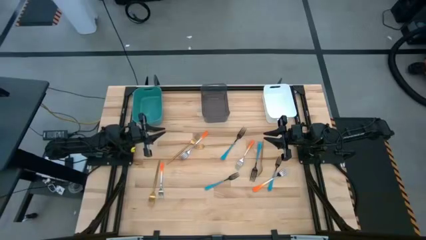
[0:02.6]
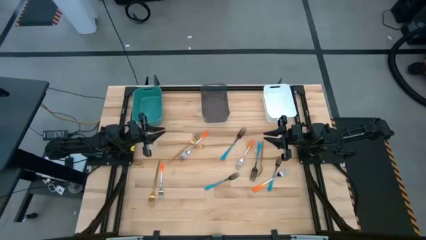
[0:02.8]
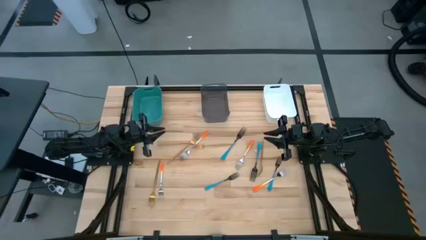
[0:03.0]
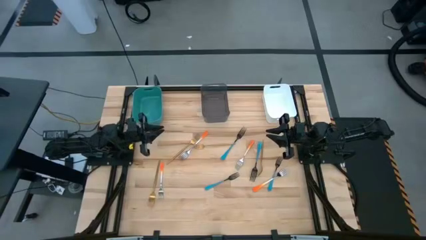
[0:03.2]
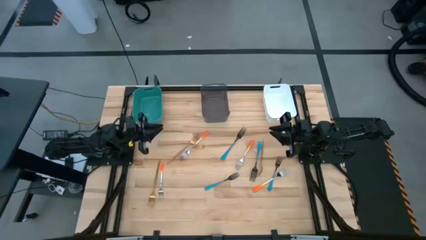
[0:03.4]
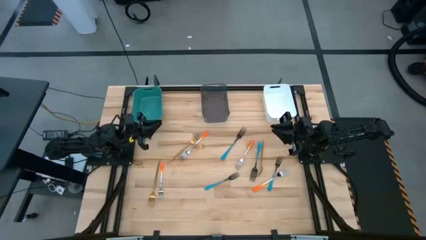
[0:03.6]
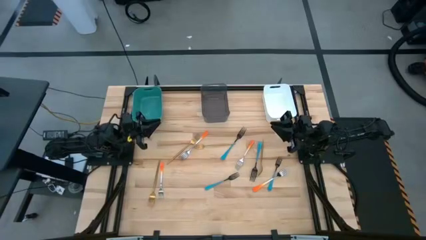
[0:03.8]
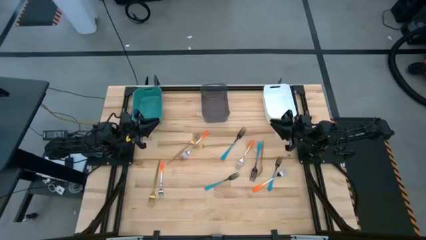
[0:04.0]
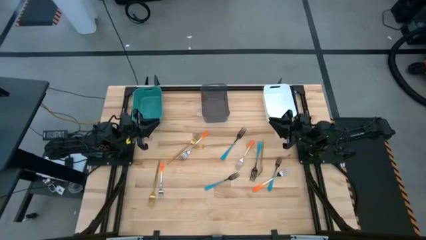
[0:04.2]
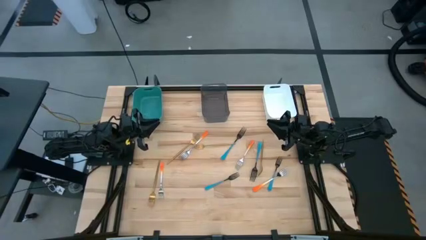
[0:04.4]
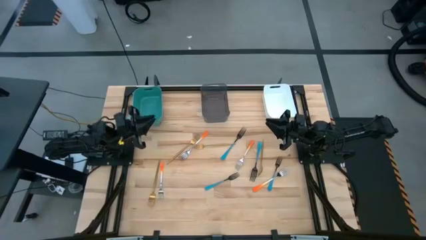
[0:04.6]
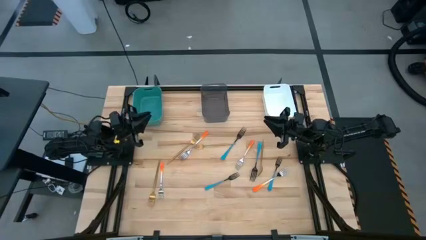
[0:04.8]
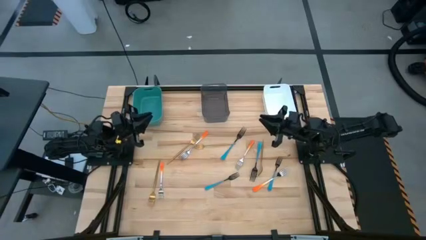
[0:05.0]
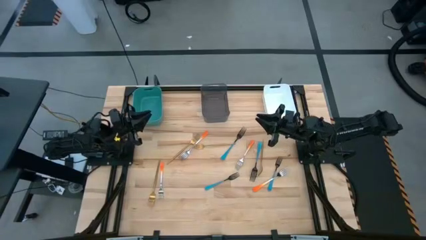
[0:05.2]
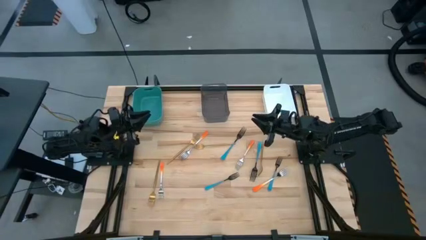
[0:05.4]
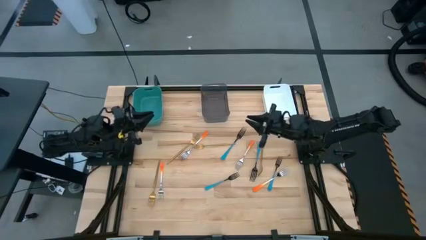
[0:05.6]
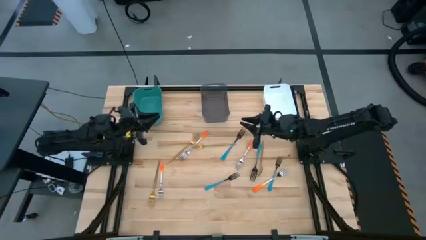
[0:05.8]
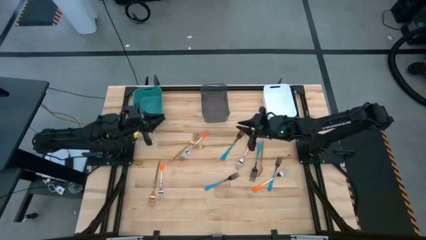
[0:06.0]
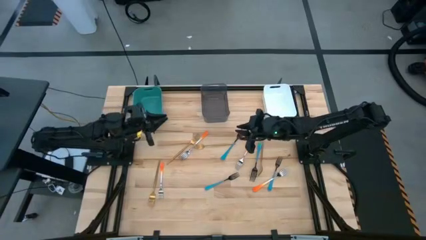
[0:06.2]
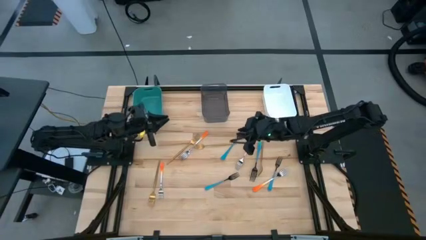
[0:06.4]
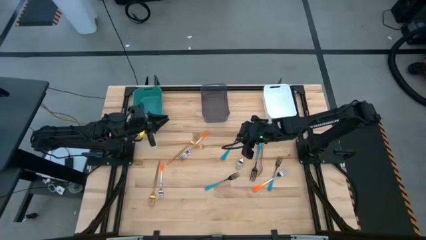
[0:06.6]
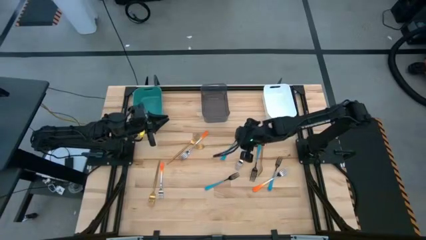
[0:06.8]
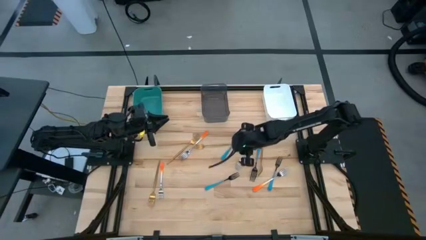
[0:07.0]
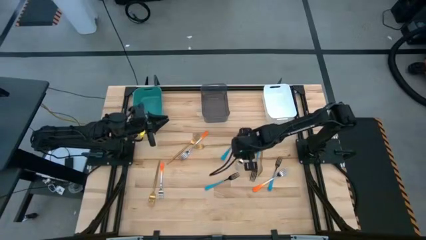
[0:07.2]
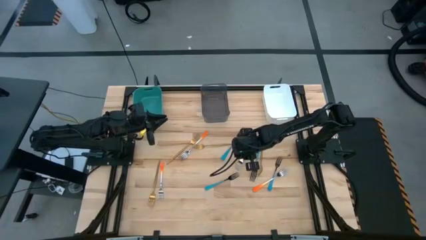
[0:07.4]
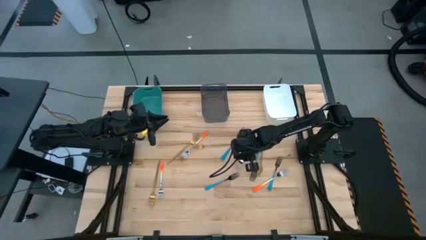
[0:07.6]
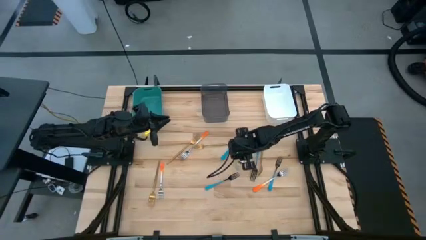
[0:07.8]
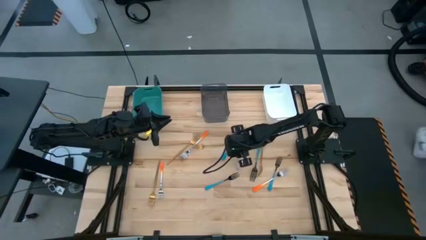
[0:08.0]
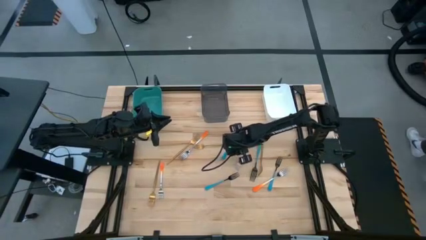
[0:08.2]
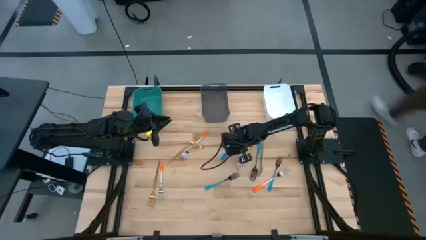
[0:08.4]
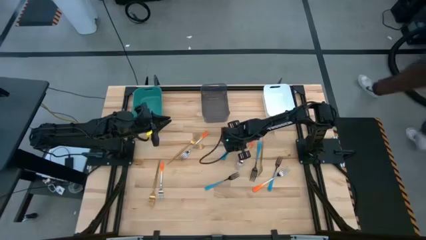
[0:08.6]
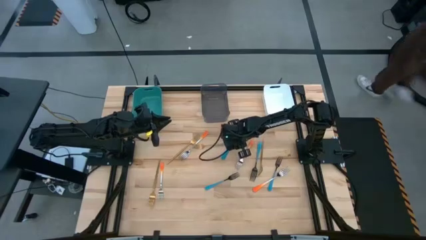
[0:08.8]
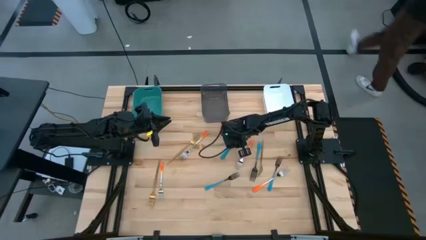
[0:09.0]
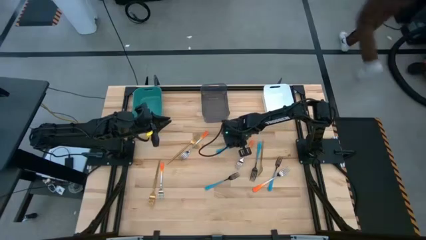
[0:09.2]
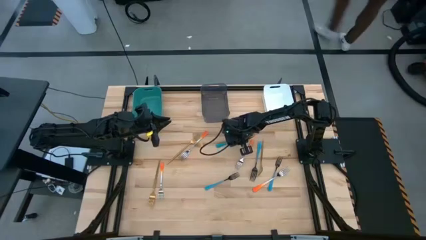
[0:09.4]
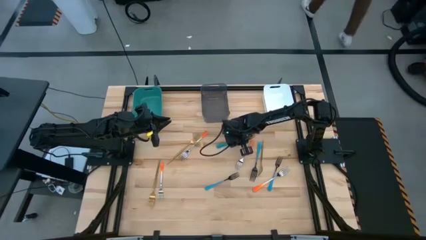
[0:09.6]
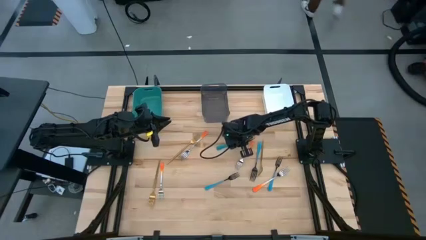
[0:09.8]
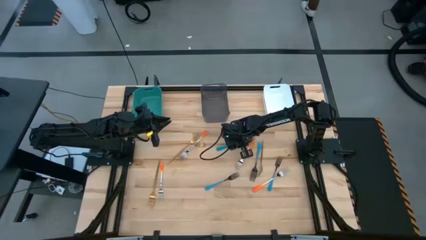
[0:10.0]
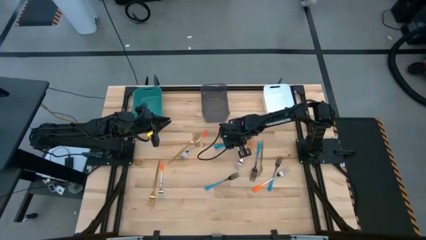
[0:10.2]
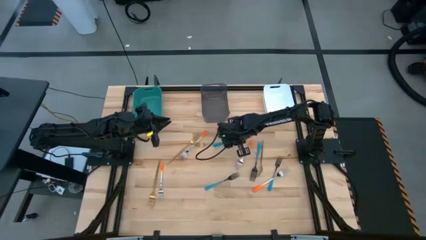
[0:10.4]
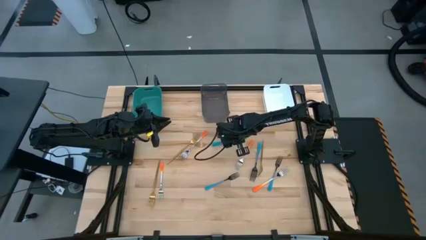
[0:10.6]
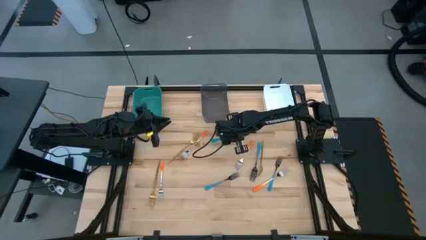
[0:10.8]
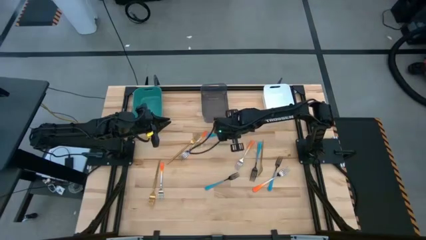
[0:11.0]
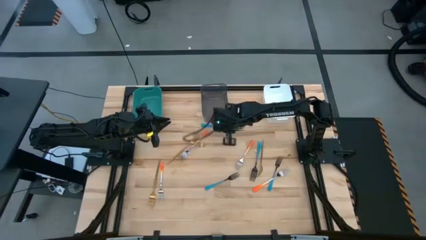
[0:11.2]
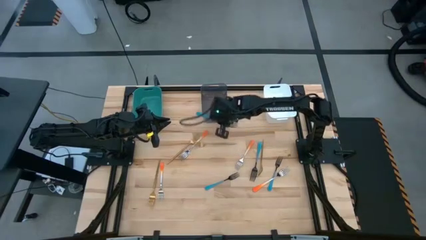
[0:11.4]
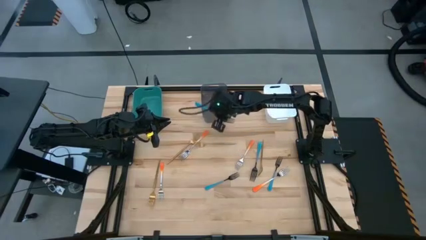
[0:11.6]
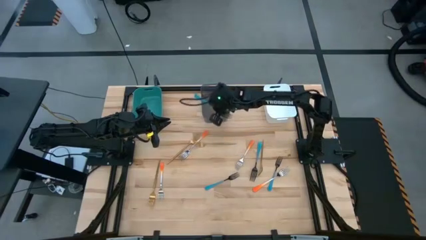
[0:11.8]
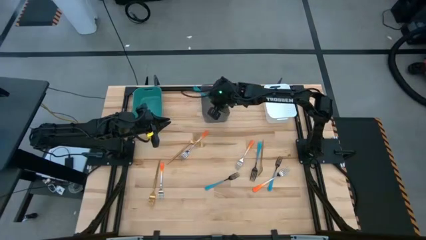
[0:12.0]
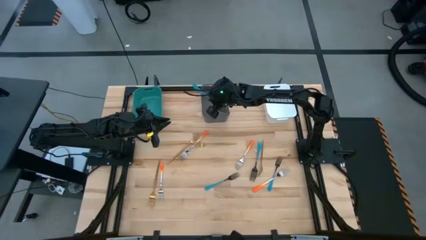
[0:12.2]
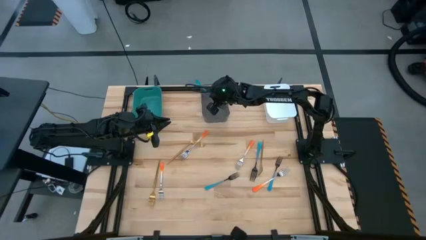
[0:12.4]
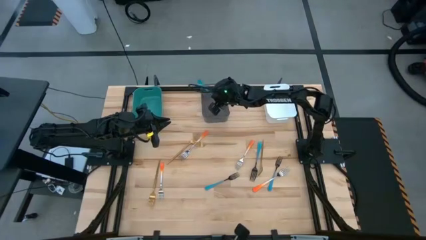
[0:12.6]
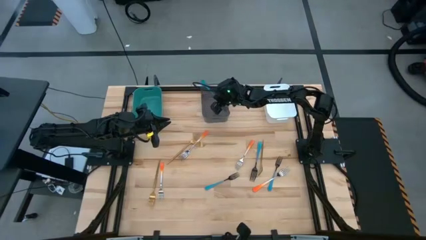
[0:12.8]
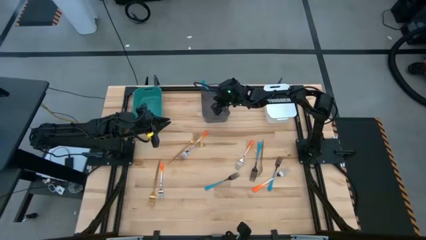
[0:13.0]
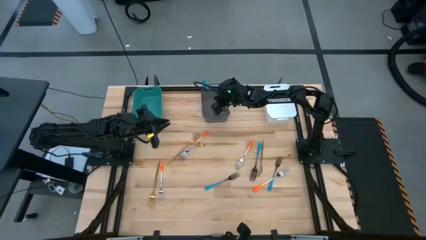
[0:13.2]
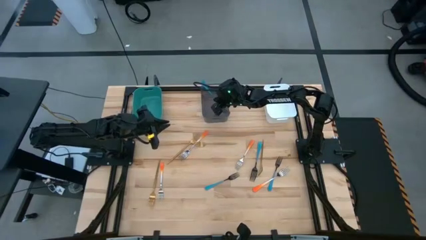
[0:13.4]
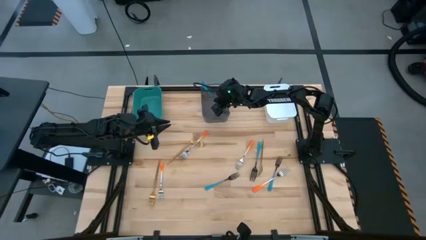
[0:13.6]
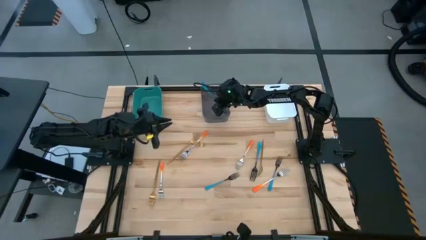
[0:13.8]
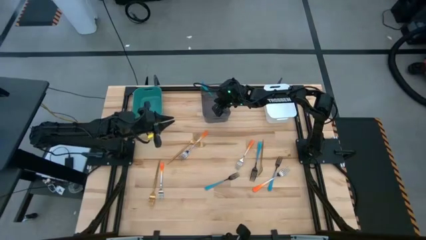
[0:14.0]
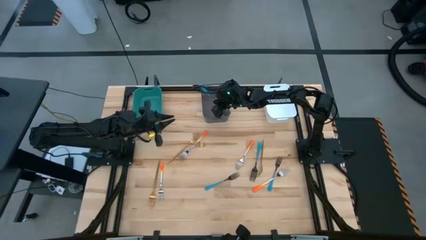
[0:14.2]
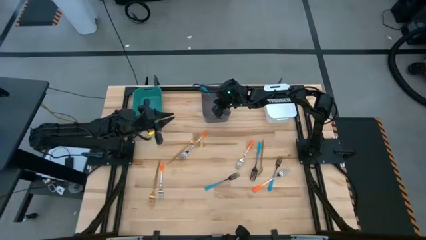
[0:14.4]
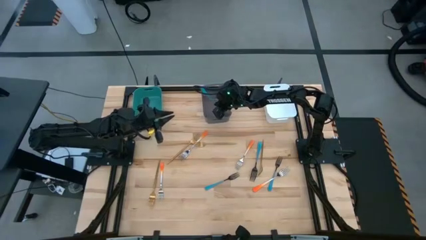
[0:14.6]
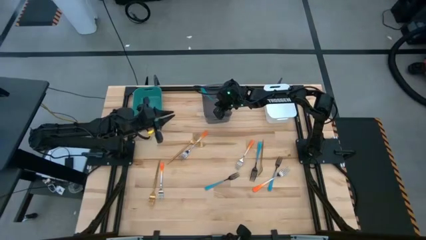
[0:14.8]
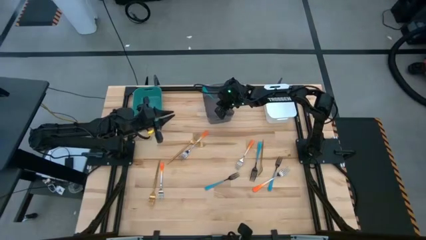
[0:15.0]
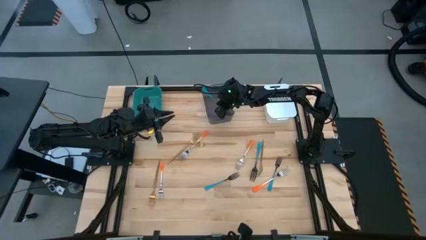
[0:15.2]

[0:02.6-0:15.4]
Task: Sort silverware by color (type)
Put the top left blue fork into the black bin

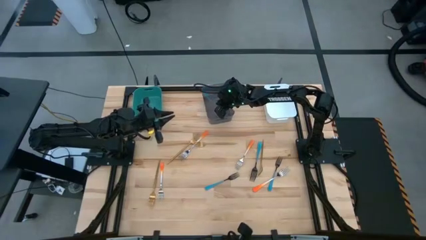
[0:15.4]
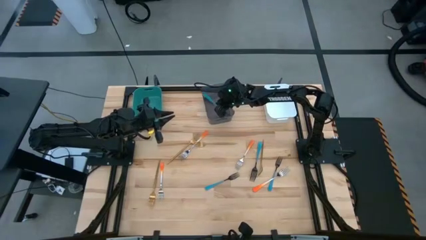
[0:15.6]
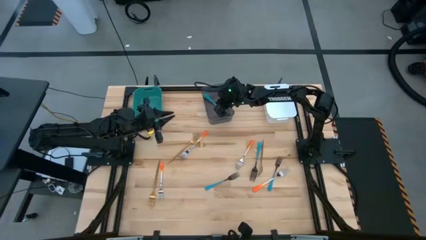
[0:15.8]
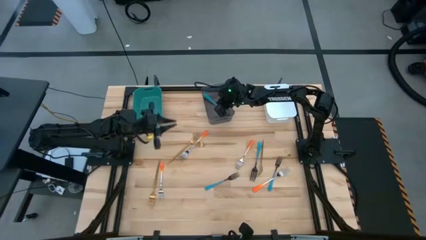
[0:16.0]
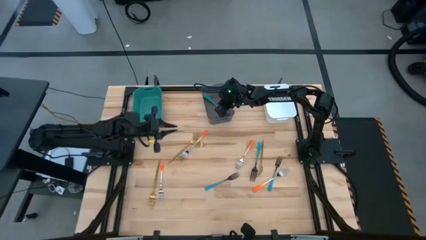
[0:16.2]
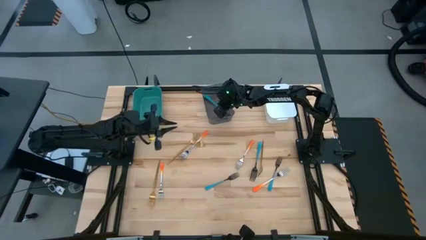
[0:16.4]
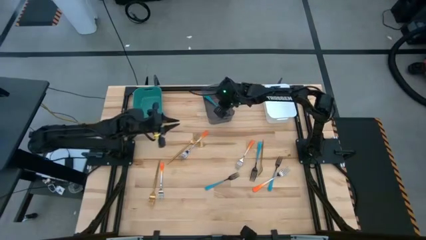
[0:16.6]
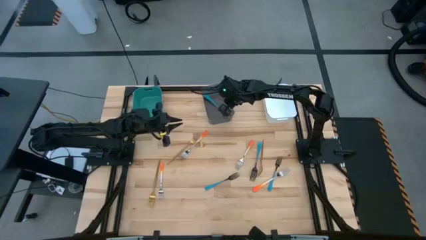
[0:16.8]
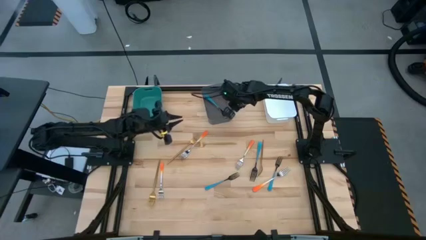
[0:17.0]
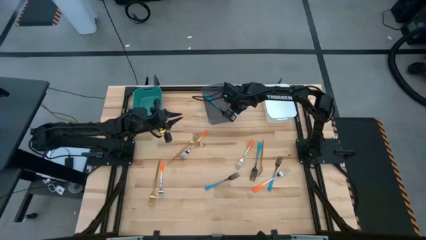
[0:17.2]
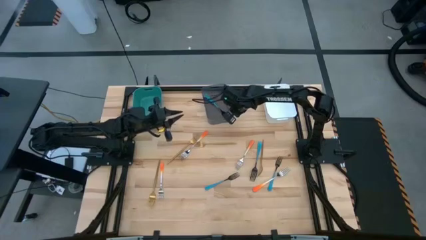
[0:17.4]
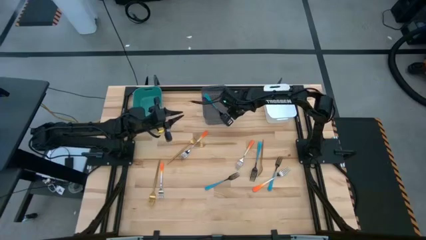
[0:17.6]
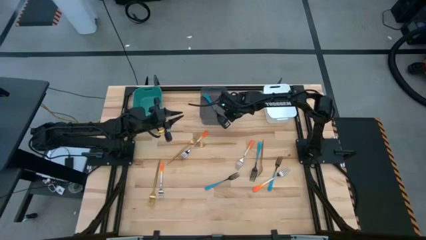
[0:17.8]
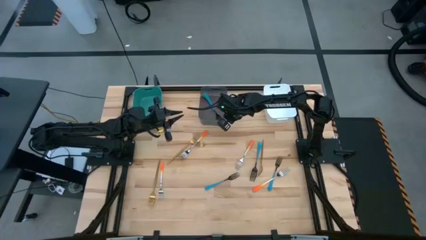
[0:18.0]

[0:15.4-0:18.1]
Adjust the black bin
